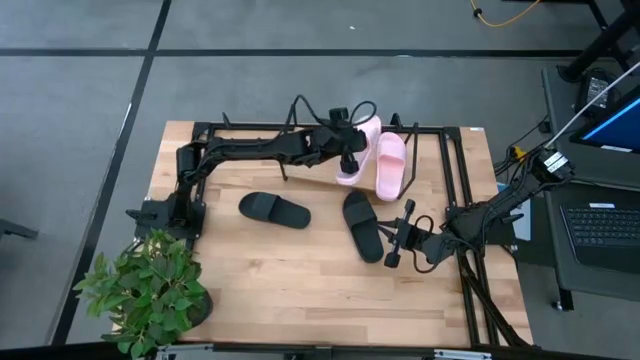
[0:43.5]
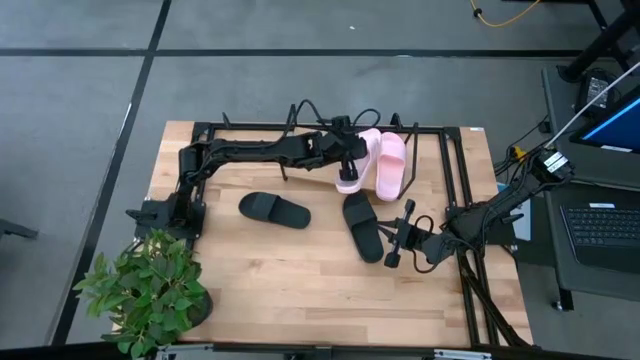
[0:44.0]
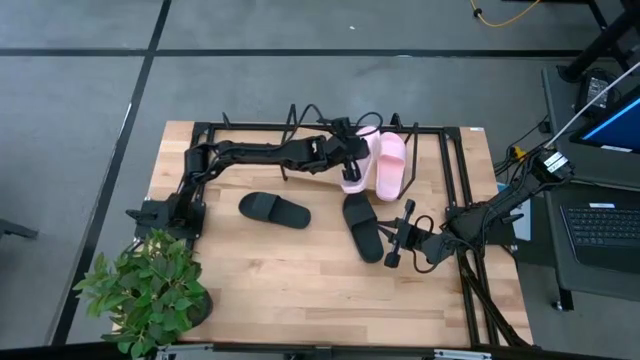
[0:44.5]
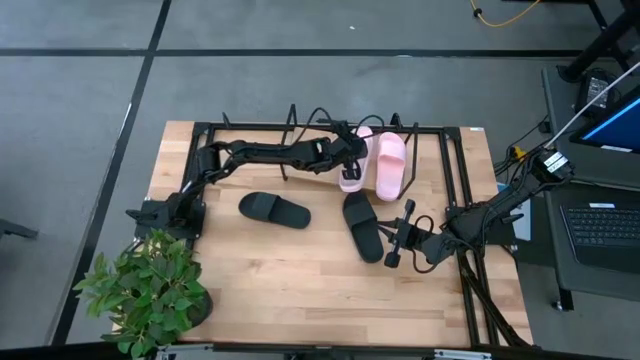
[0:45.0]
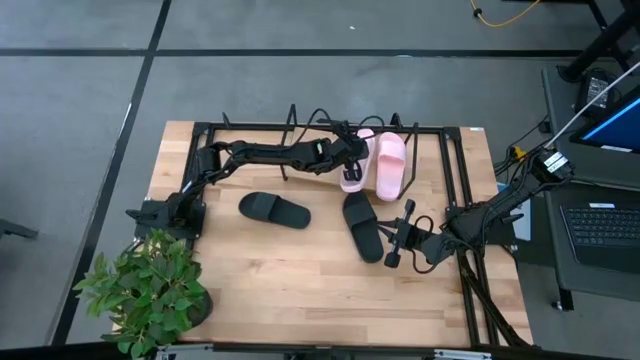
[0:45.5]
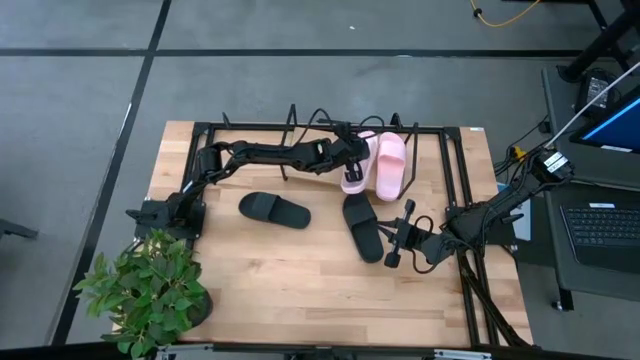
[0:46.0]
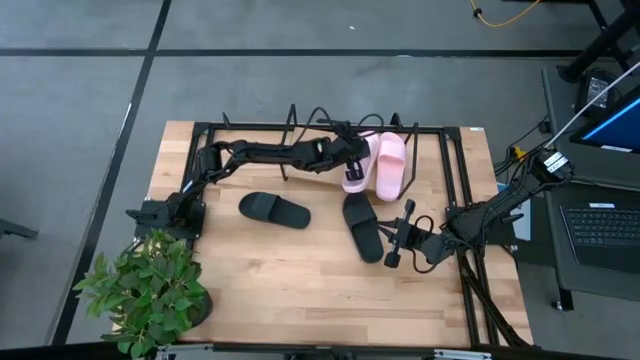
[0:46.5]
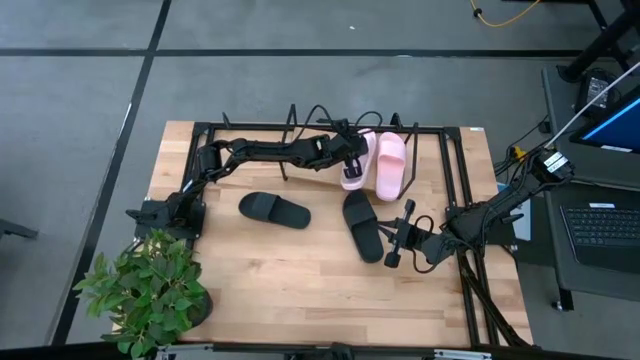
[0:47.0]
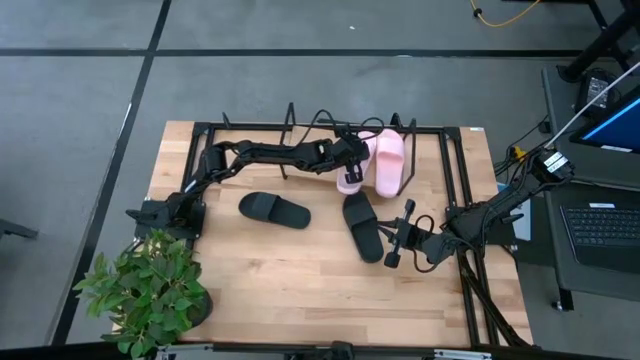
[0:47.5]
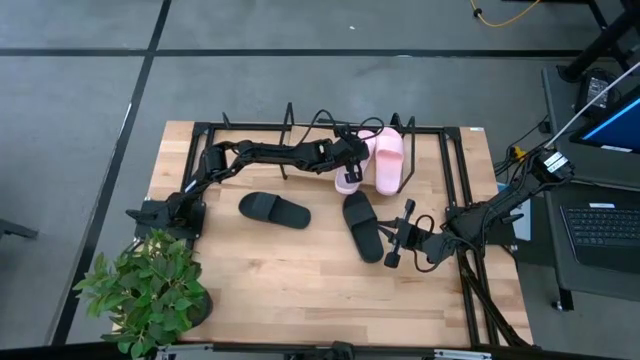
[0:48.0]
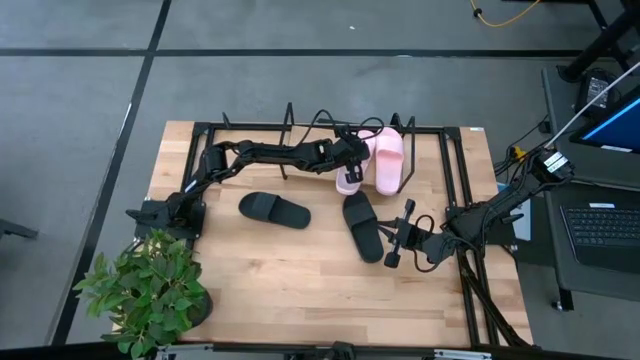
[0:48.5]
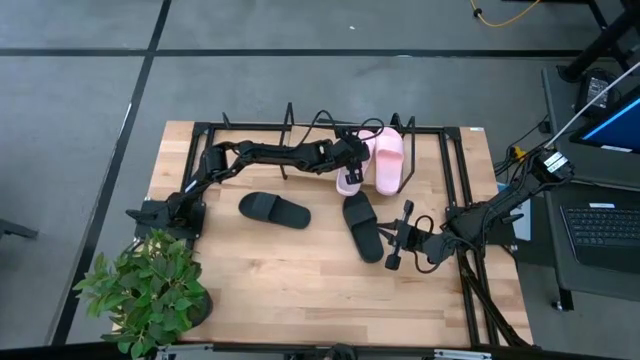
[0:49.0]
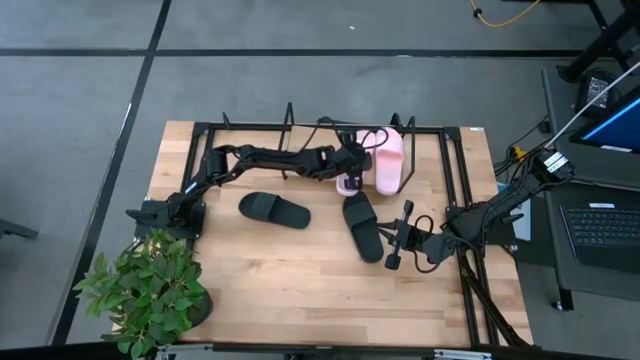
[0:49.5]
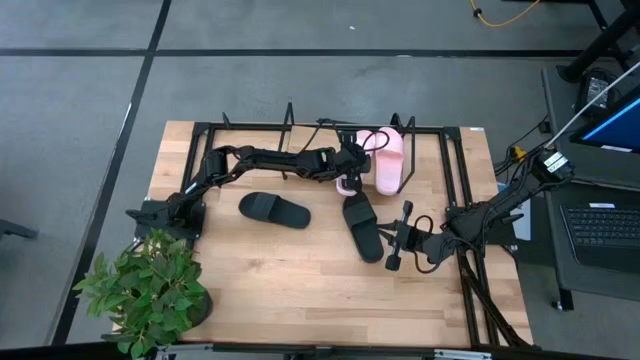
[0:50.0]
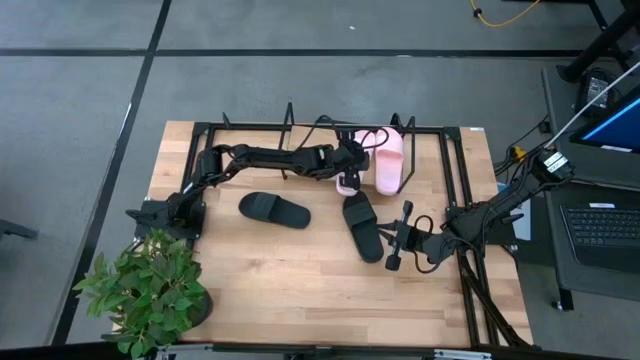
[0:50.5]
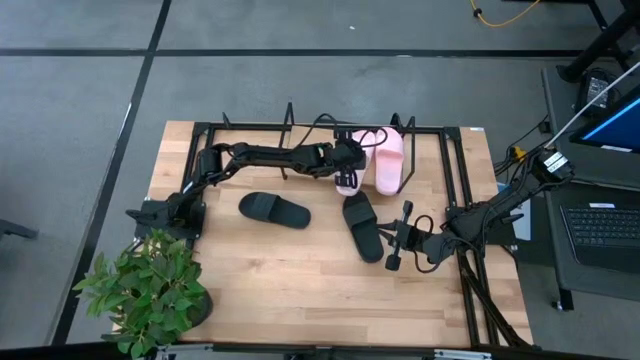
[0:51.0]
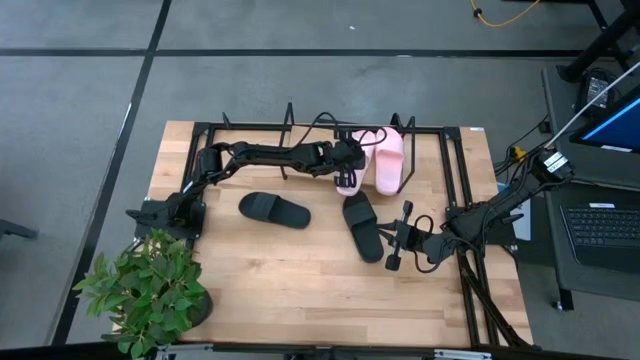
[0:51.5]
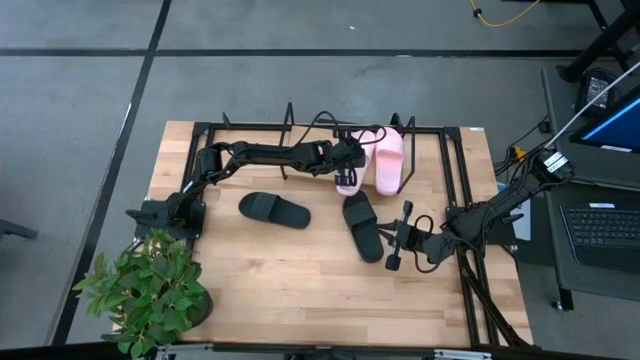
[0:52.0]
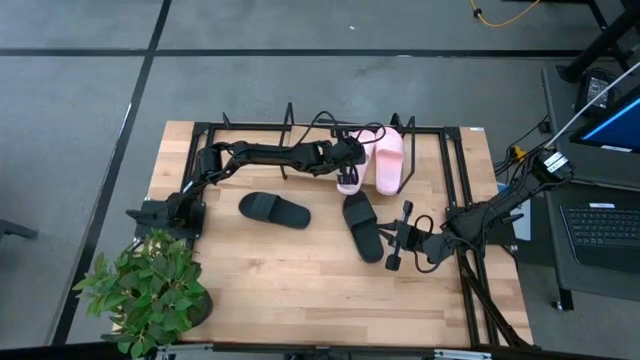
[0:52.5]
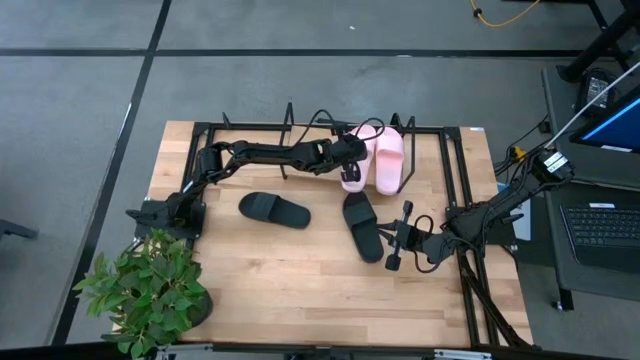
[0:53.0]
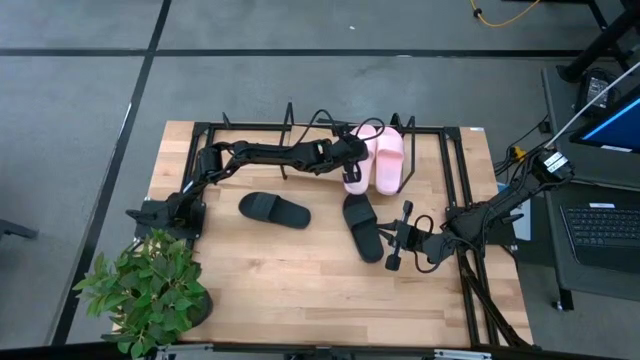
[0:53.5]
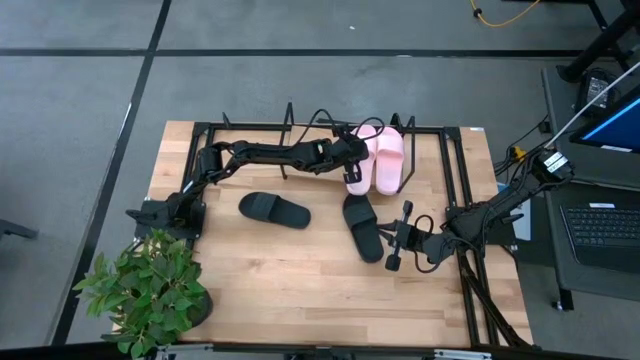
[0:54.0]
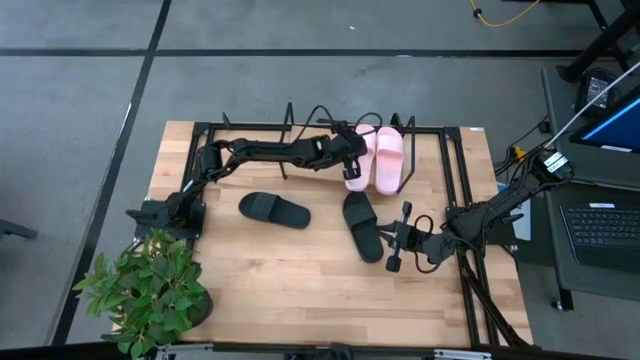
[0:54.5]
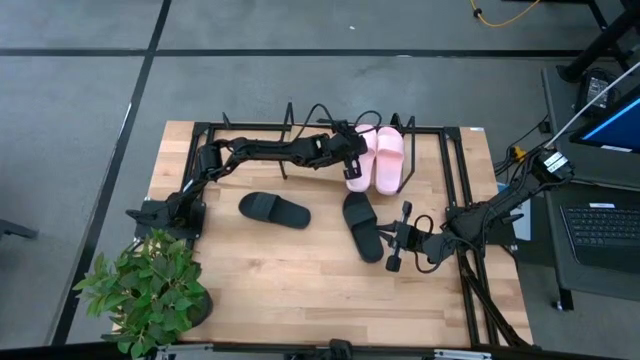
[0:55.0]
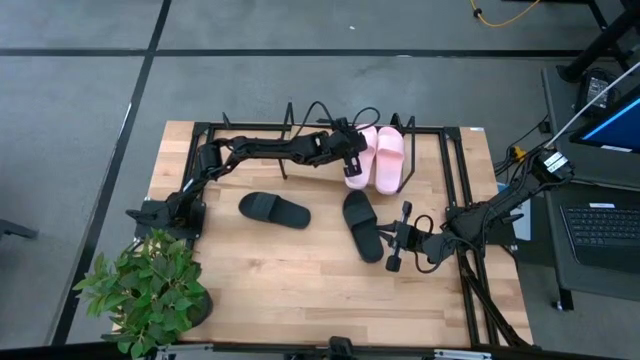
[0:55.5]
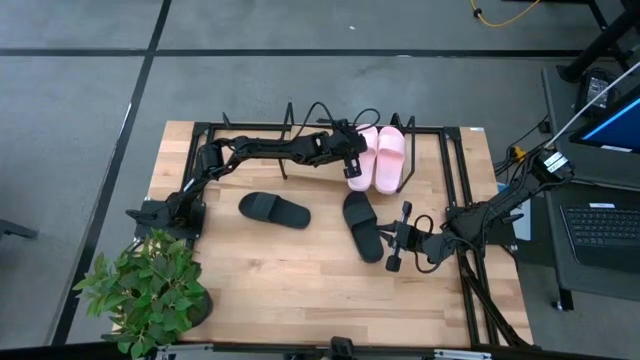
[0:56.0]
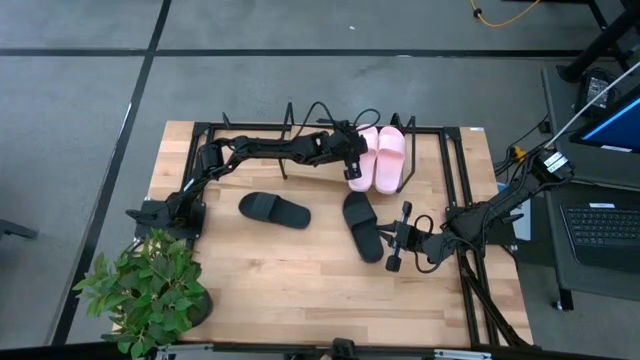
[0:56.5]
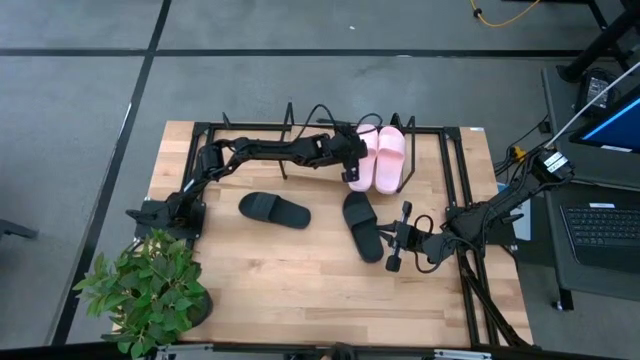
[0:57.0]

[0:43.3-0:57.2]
Task: Pick and place slides into the shelf
Put the pink slide on the shelf
